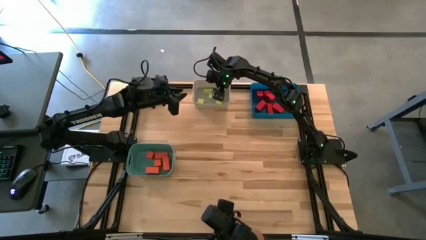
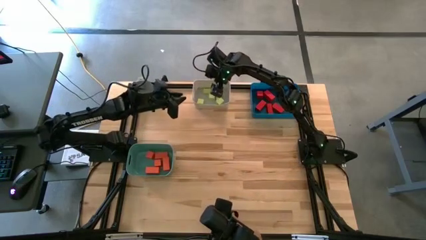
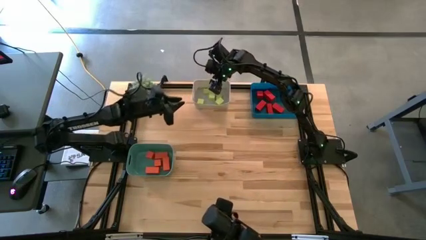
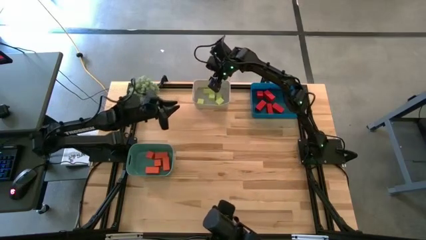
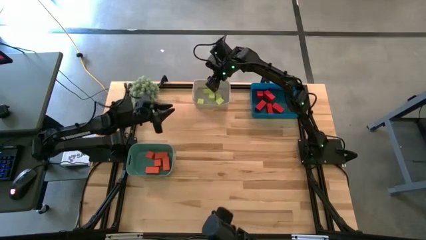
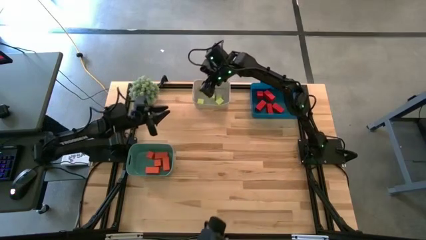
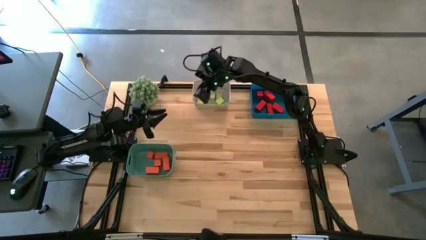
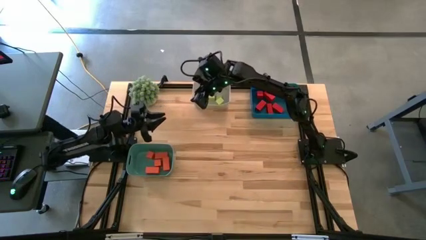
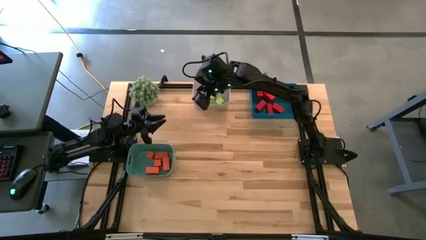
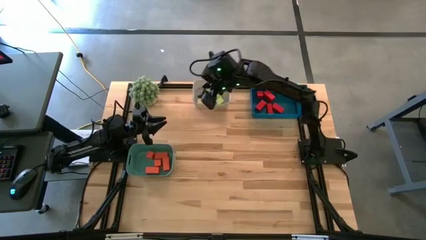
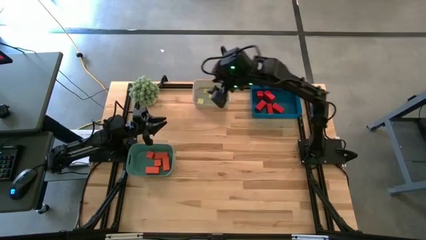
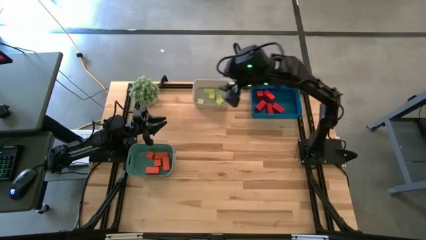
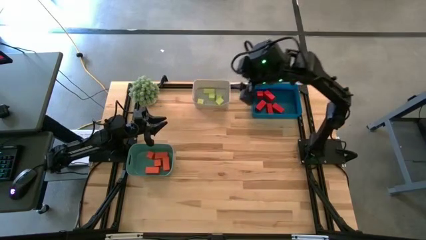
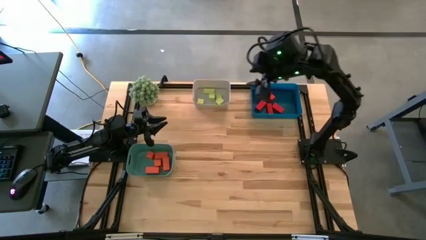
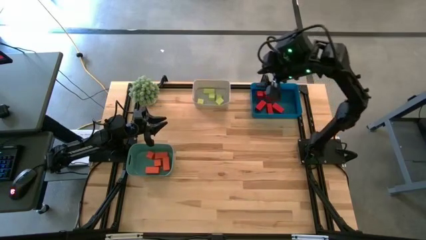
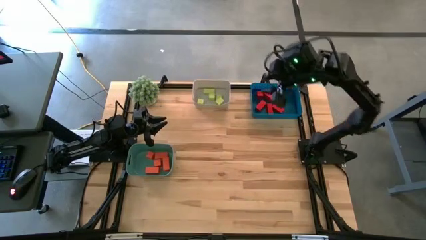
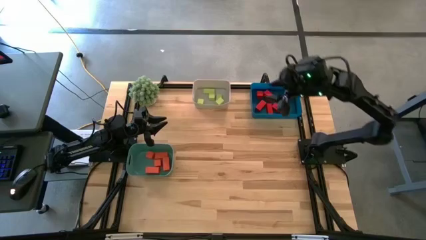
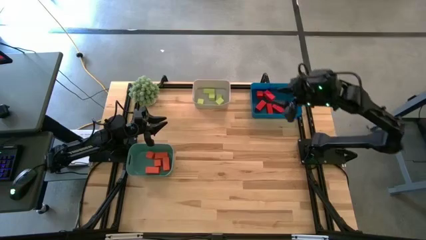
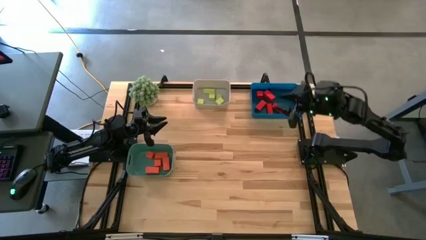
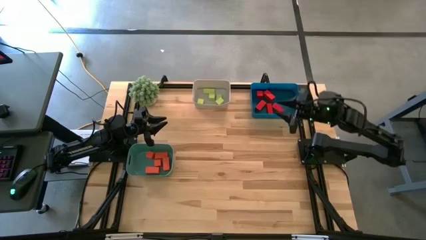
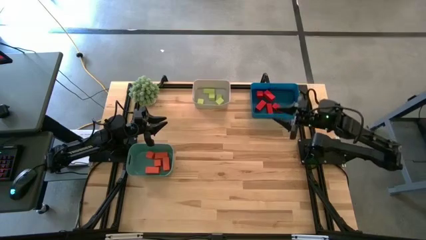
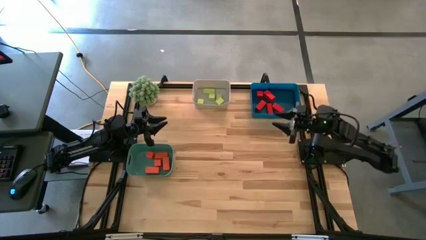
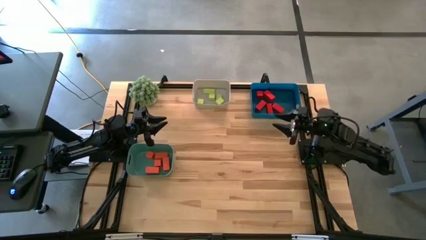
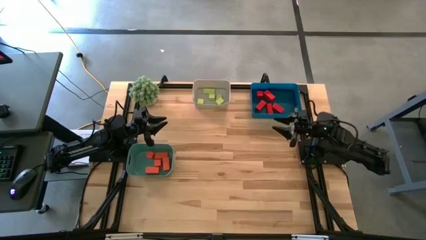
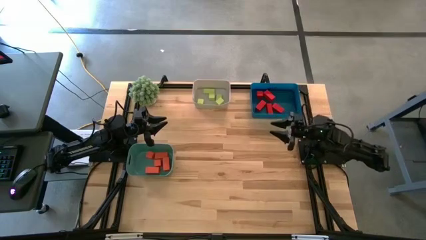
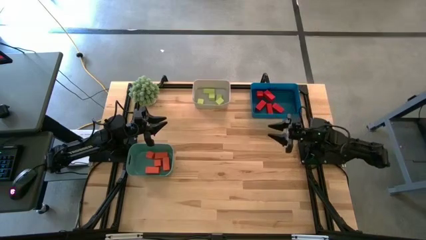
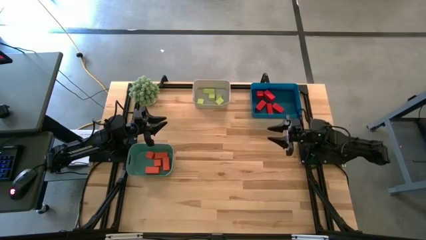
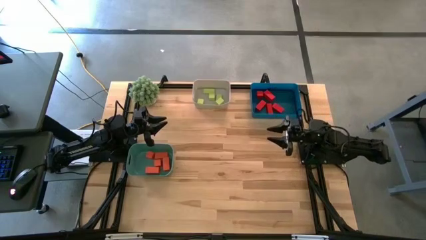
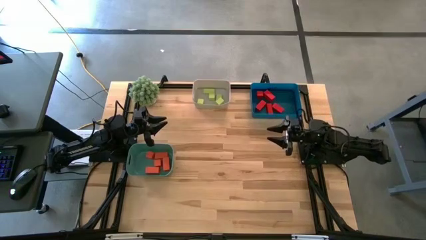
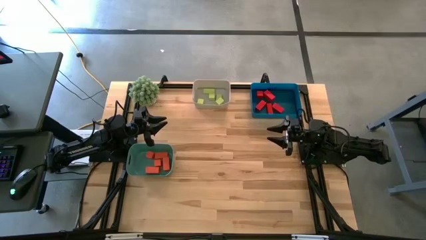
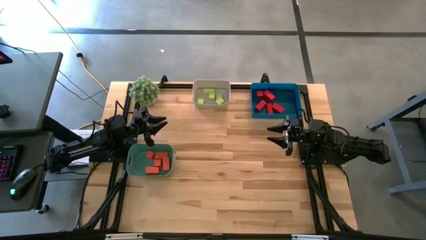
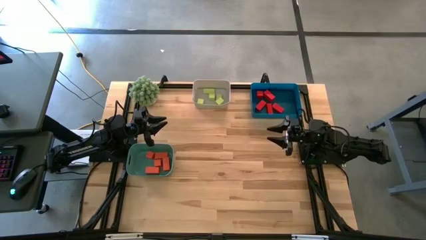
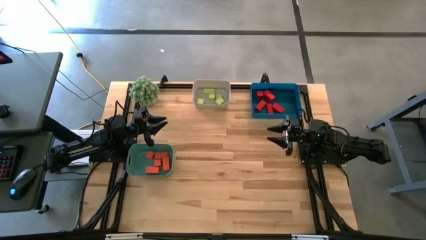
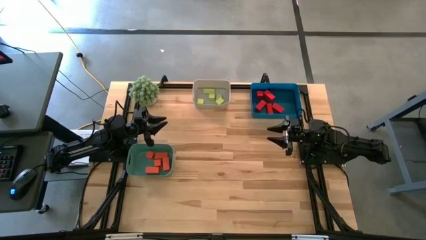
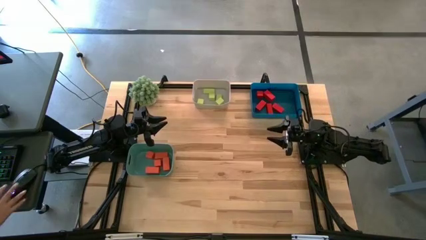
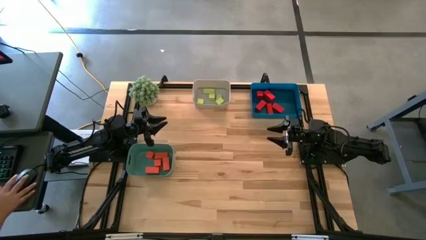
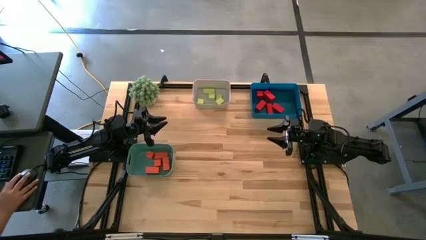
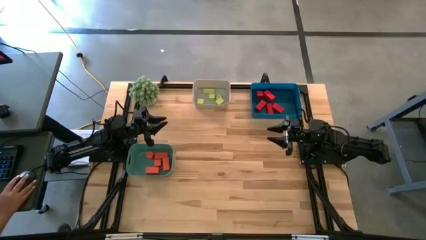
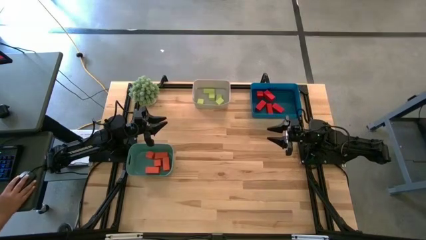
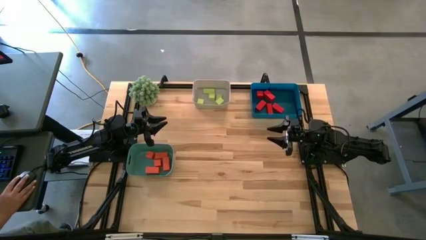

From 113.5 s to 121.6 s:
Task: Sort & place blocks by color
Return to Home Position

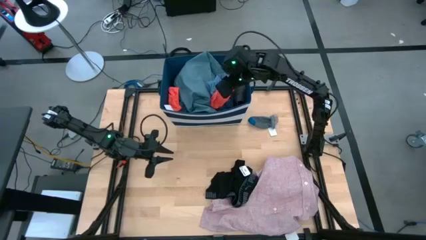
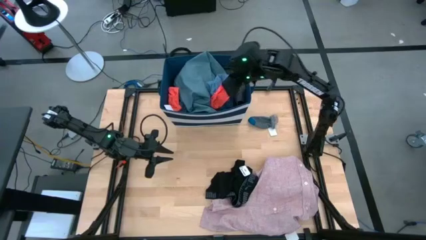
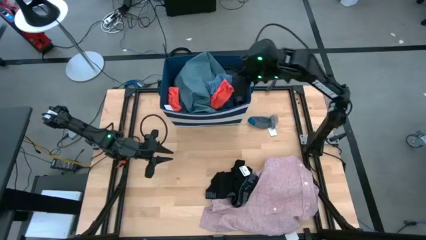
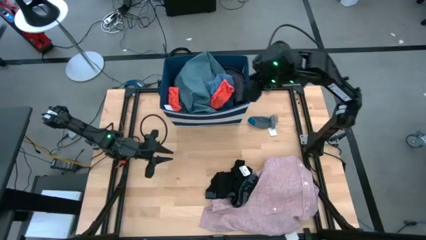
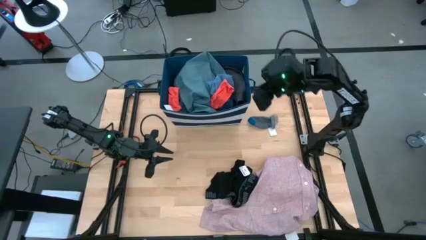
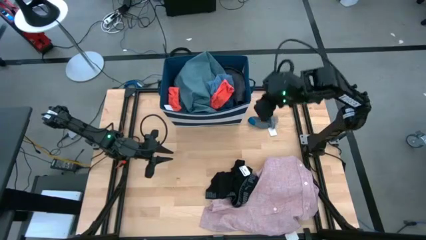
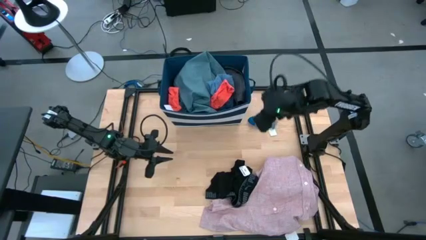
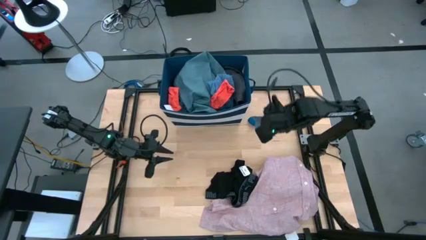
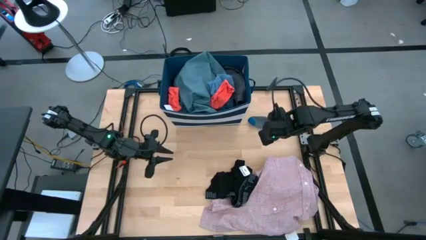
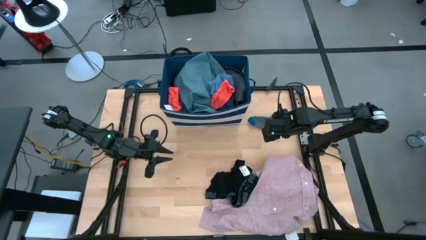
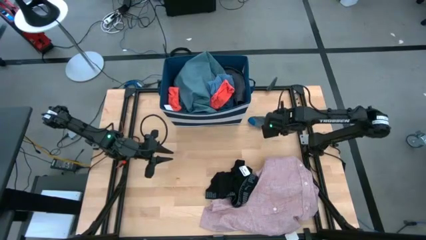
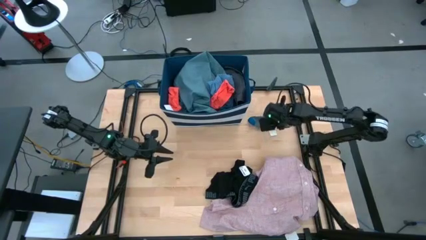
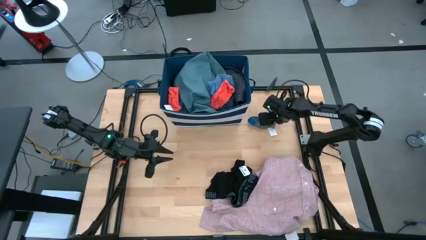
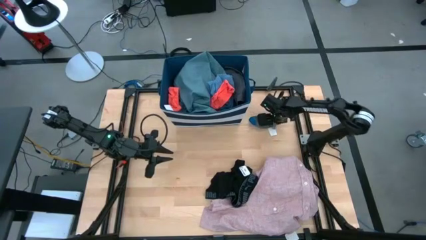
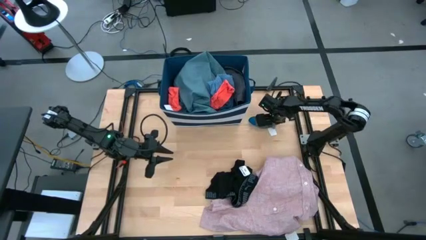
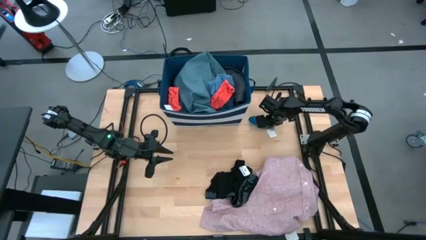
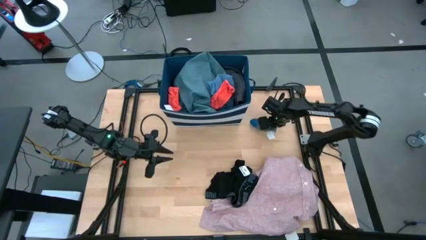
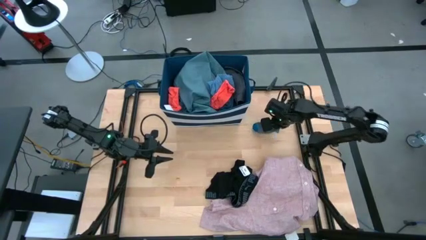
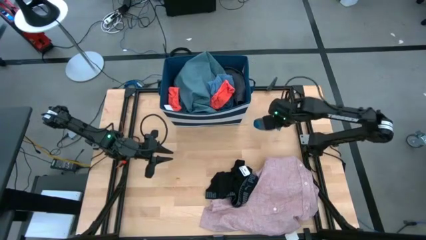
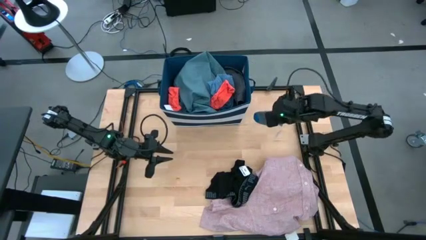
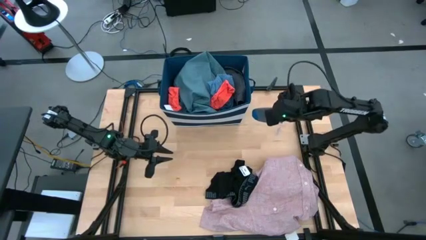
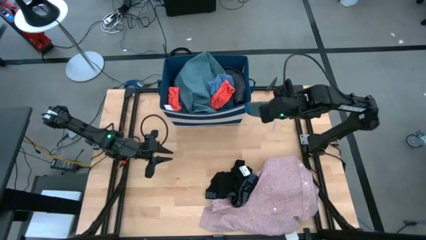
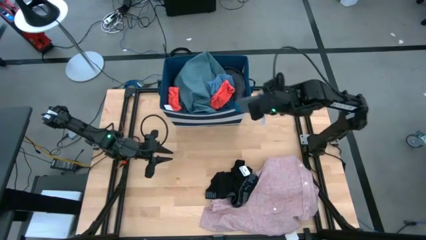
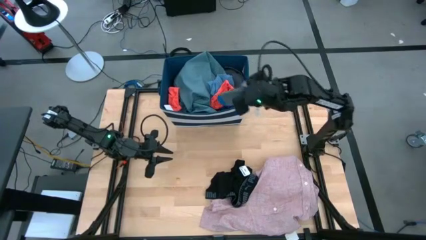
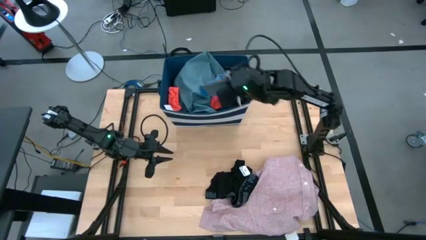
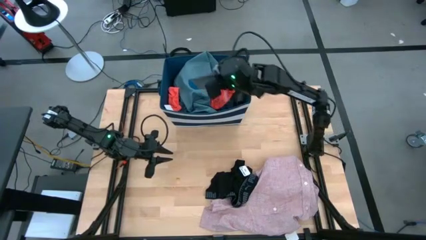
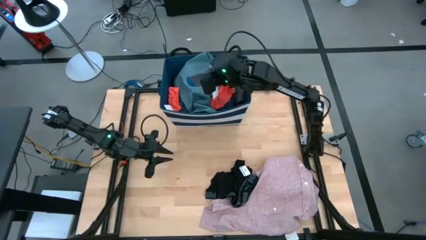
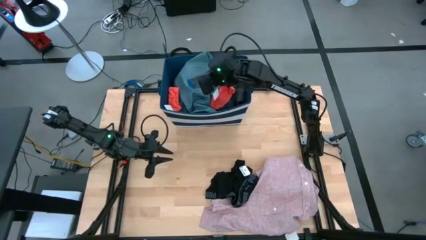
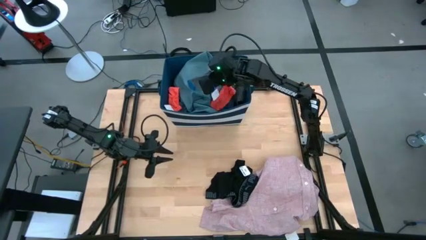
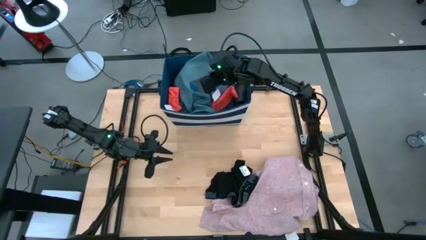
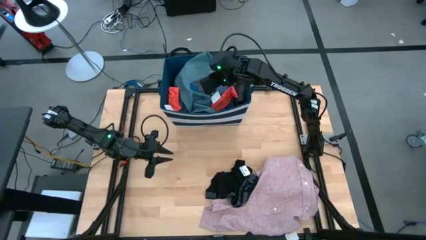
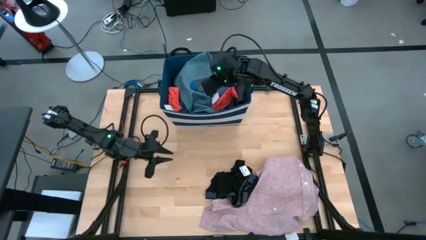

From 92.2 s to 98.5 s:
Task: Sort clothes
Put the gray sock into the blue bin
